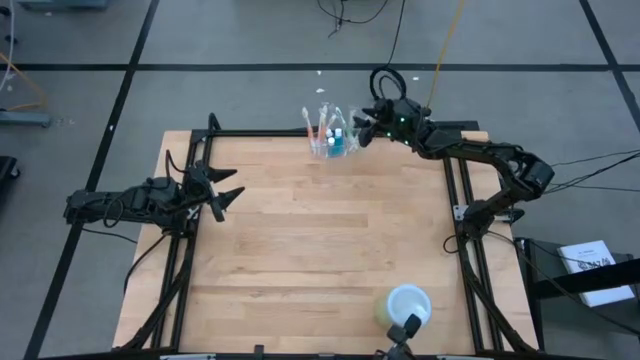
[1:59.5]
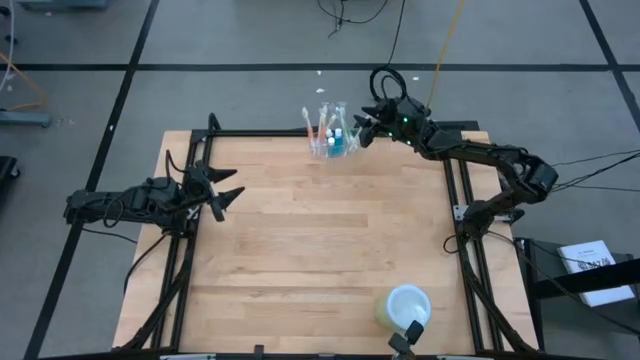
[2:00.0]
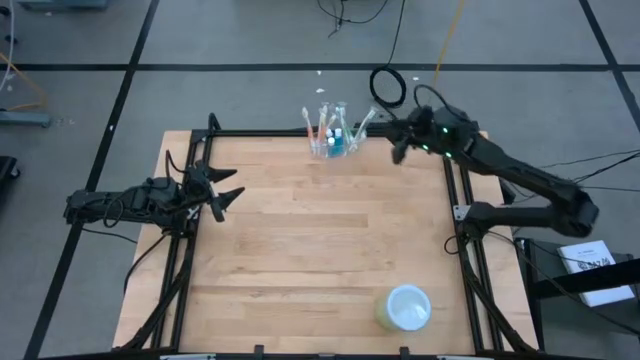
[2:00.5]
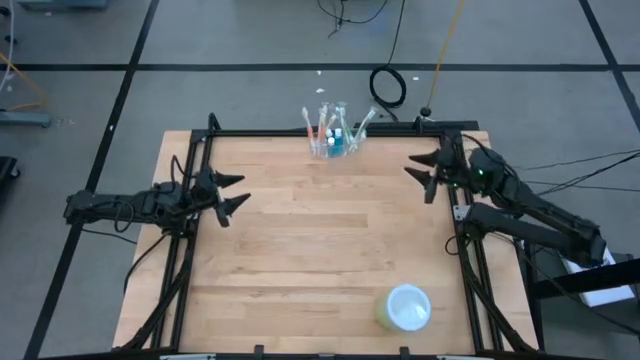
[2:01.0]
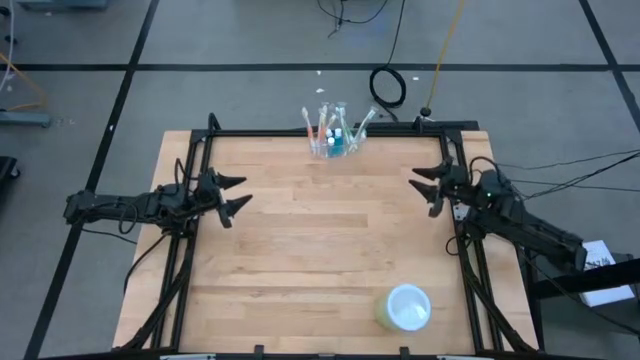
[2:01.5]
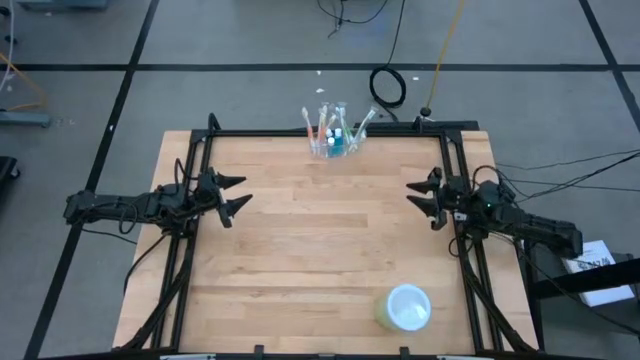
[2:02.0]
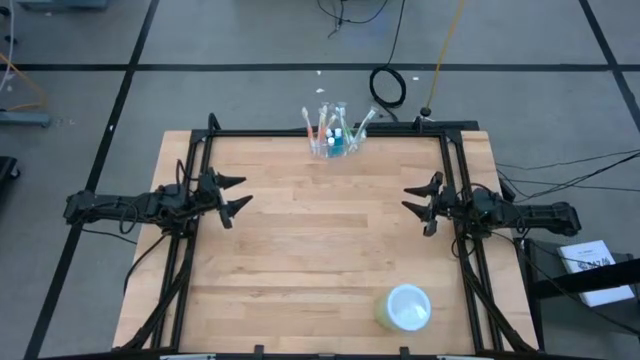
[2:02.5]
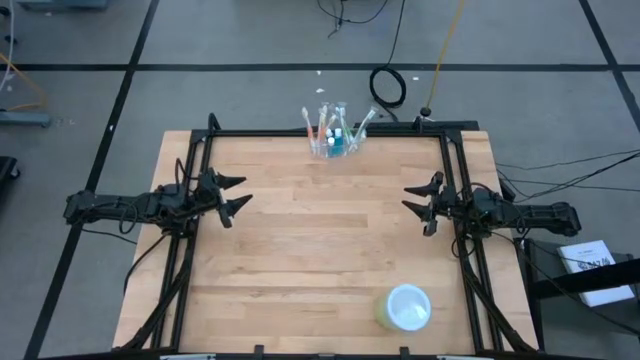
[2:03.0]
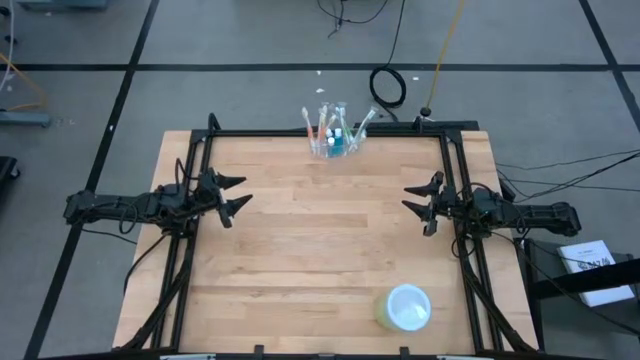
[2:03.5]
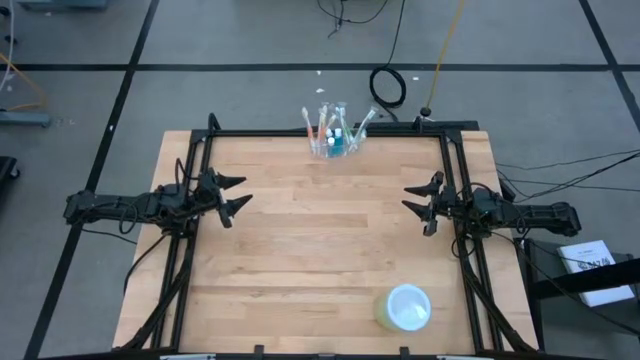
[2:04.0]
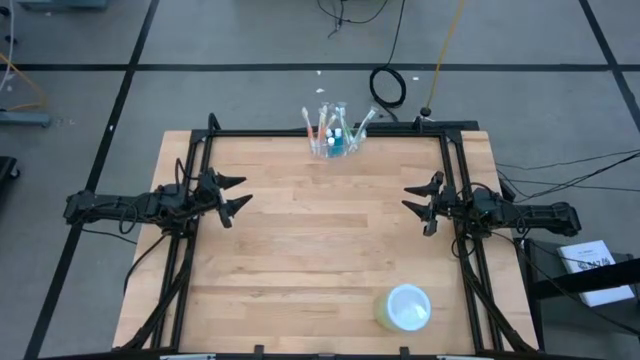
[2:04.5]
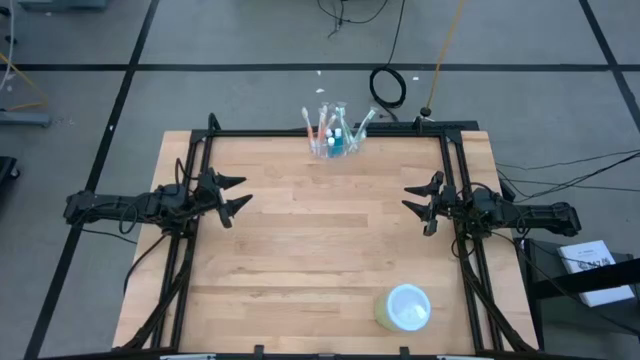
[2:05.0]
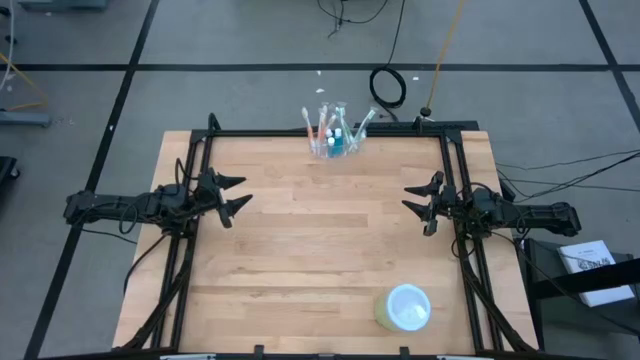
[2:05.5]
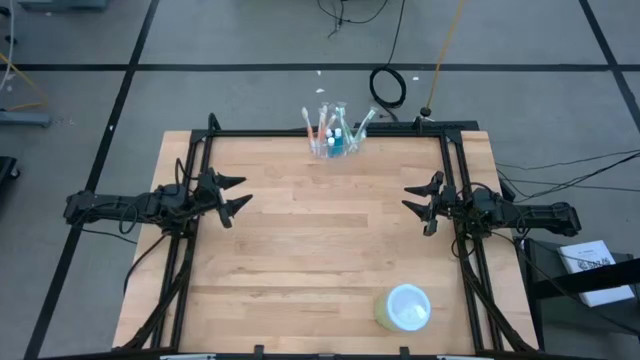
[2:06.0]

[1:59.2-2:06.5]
Task: Pick & Place toothbrushing station
Return to Home Position

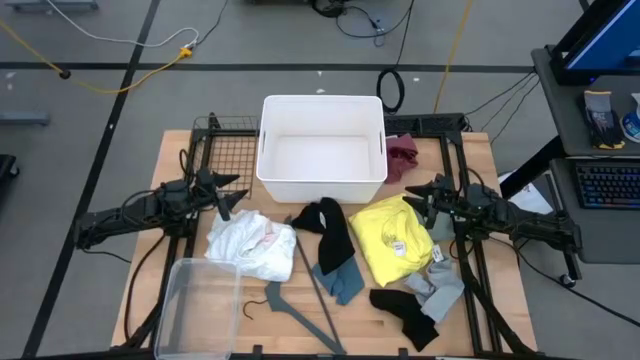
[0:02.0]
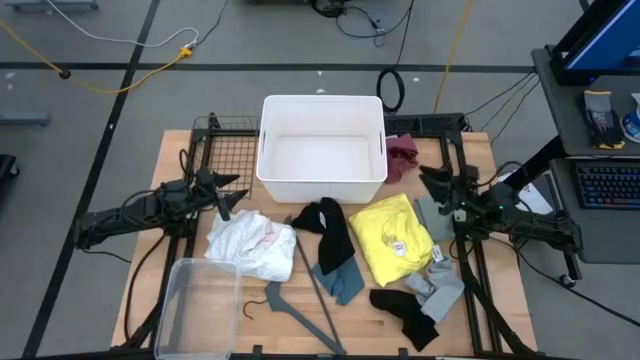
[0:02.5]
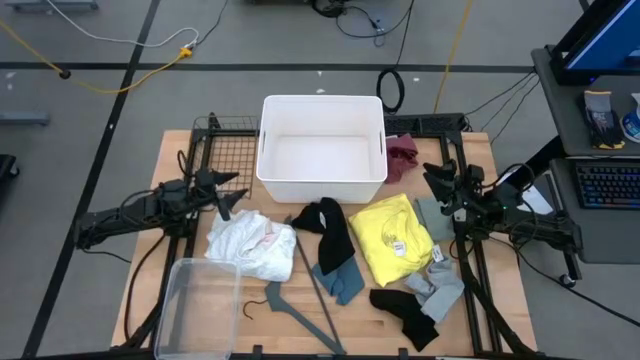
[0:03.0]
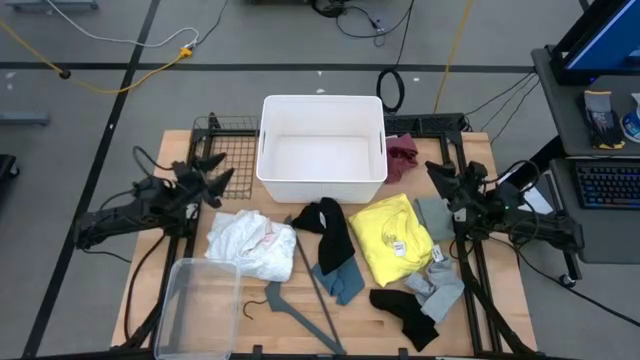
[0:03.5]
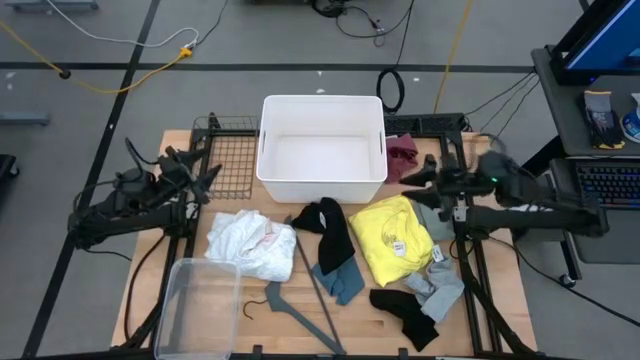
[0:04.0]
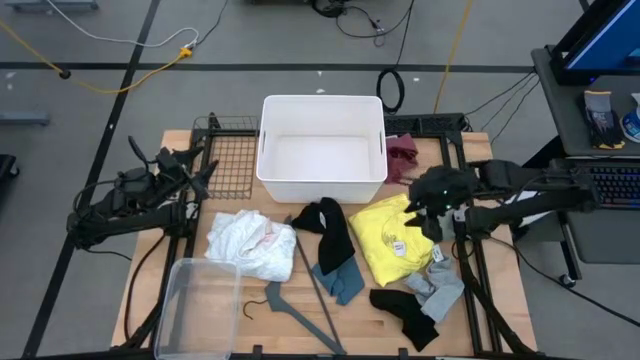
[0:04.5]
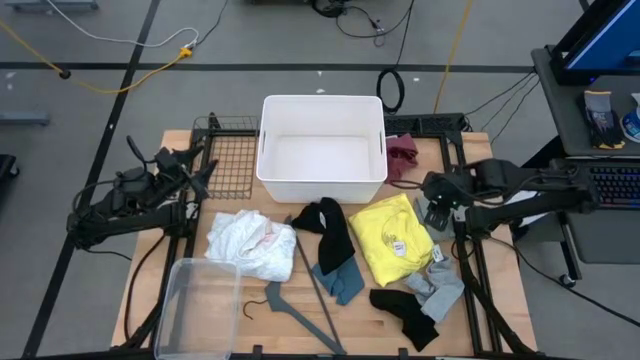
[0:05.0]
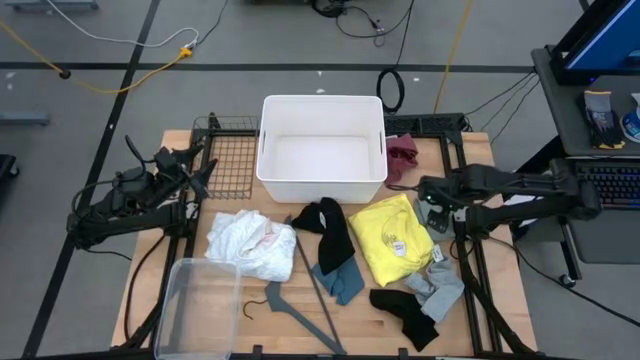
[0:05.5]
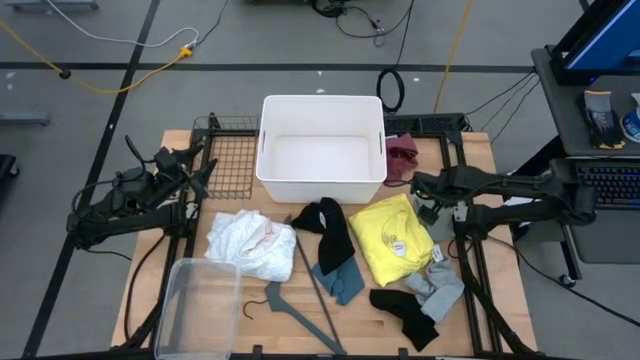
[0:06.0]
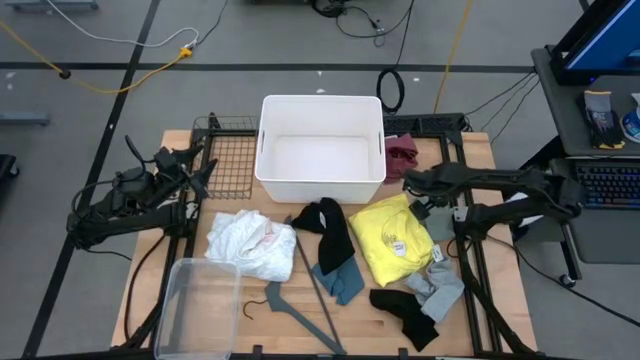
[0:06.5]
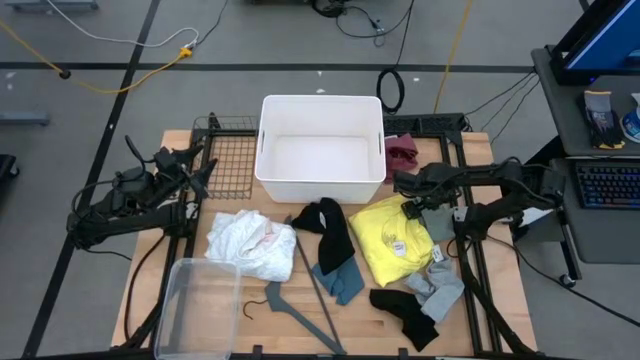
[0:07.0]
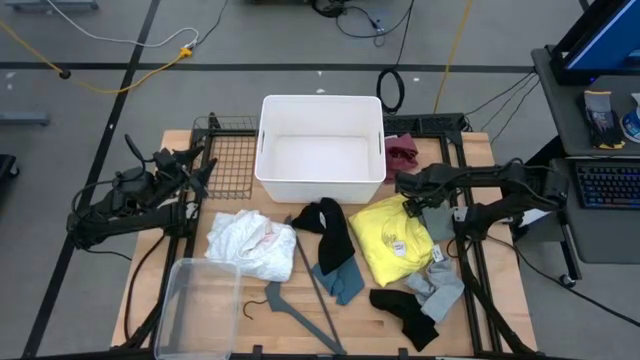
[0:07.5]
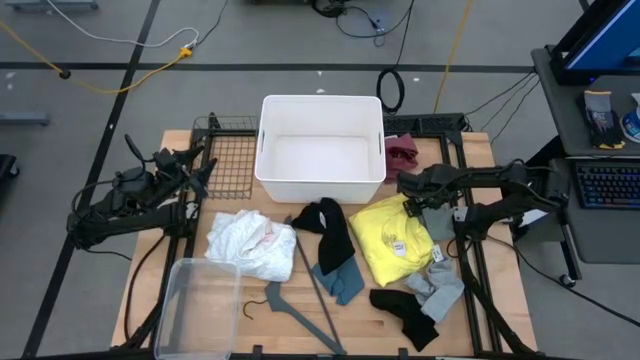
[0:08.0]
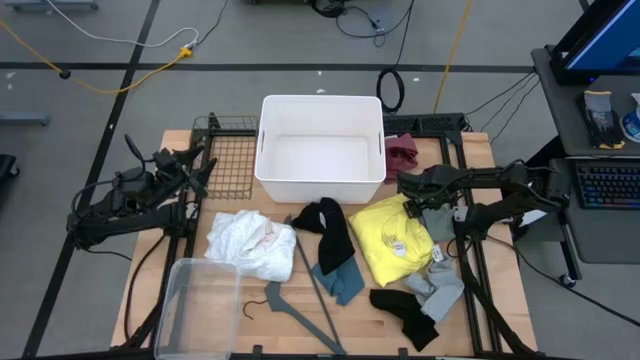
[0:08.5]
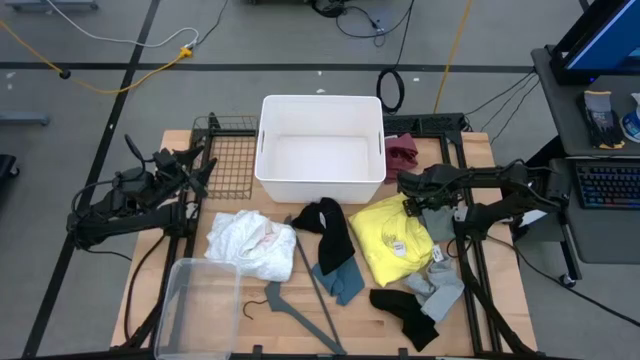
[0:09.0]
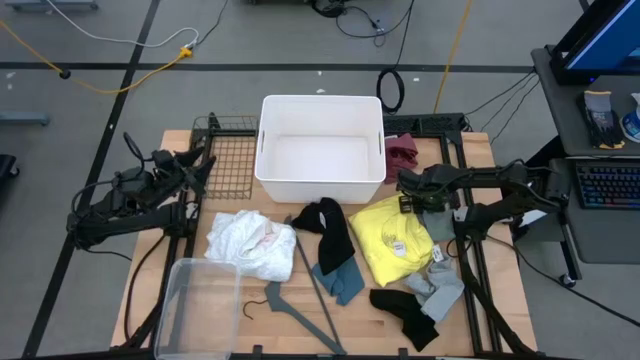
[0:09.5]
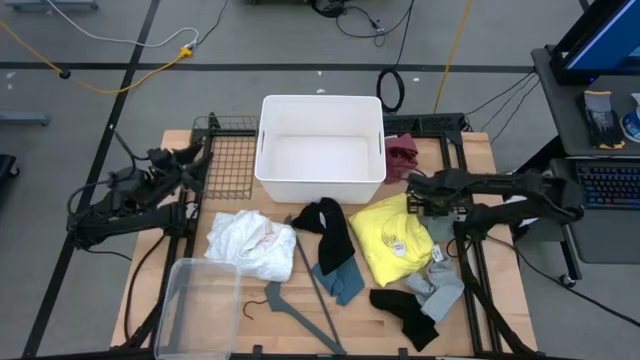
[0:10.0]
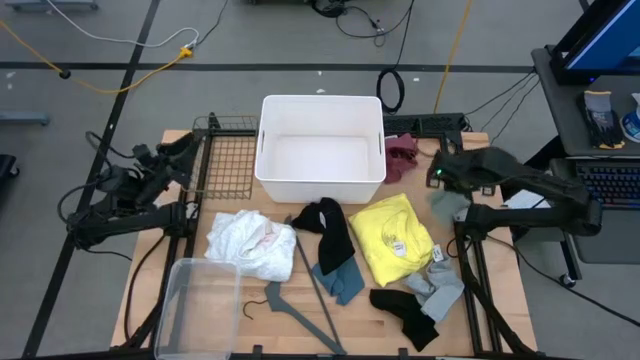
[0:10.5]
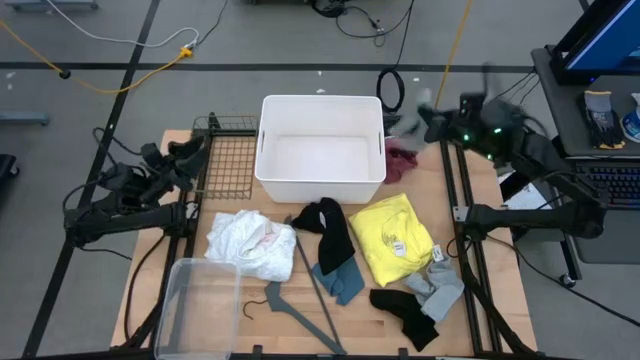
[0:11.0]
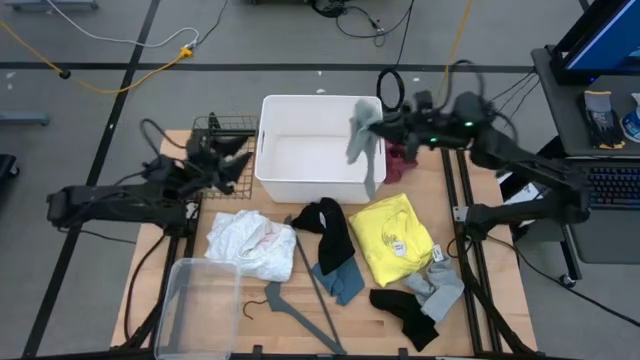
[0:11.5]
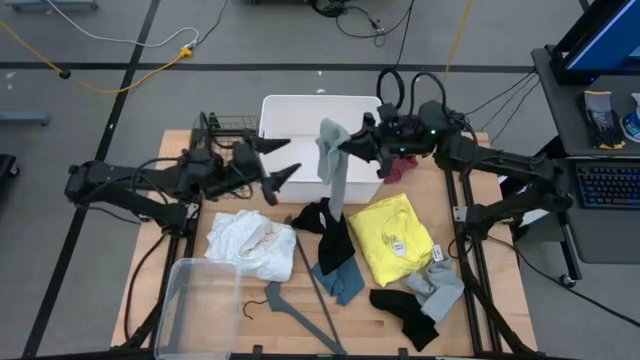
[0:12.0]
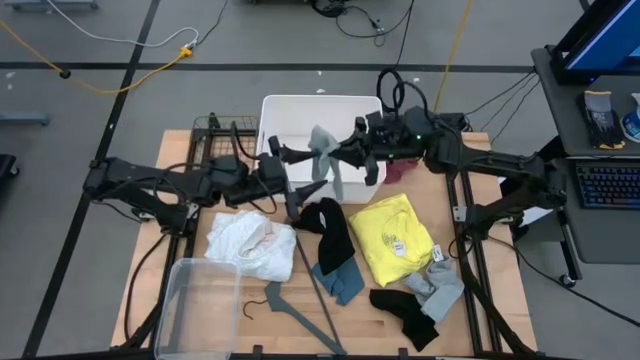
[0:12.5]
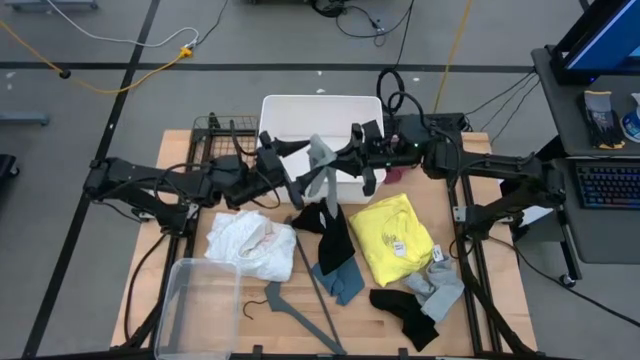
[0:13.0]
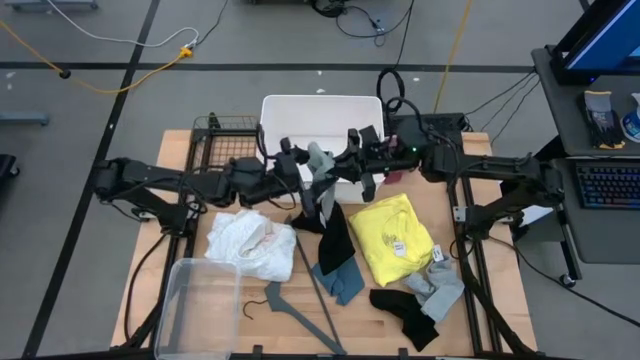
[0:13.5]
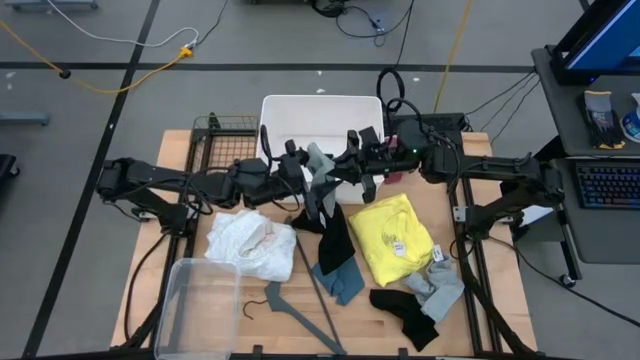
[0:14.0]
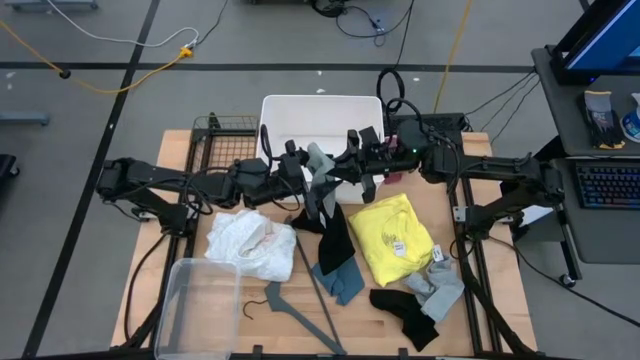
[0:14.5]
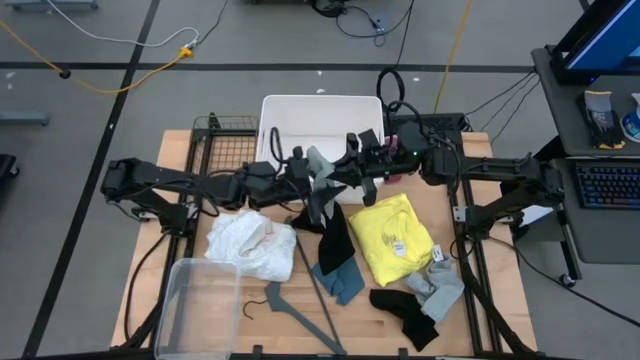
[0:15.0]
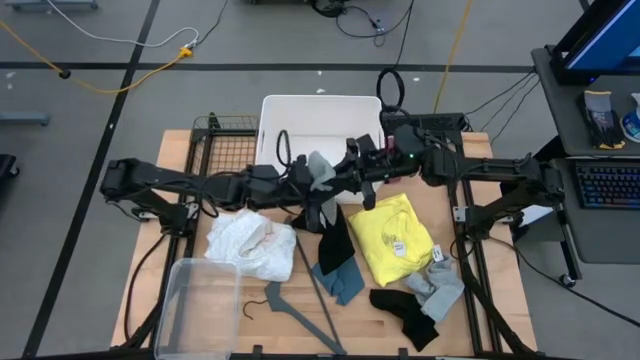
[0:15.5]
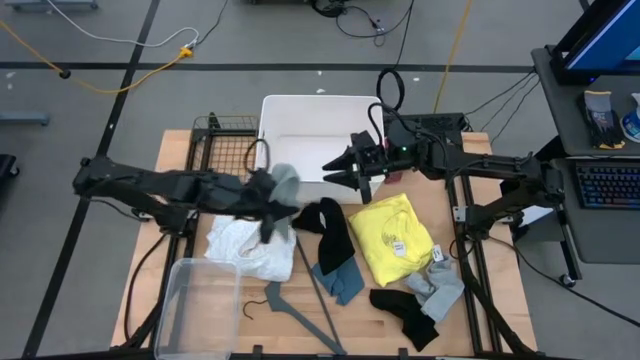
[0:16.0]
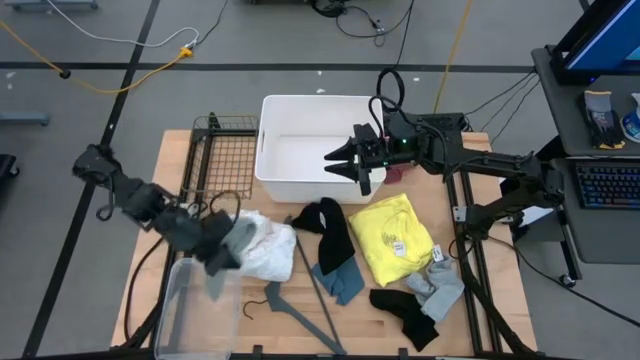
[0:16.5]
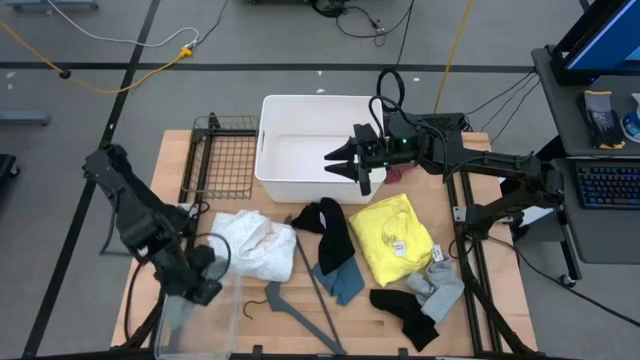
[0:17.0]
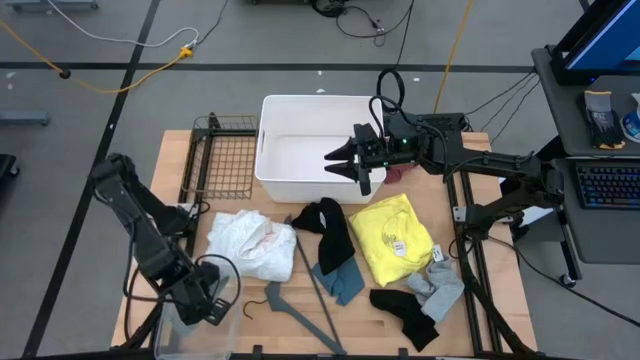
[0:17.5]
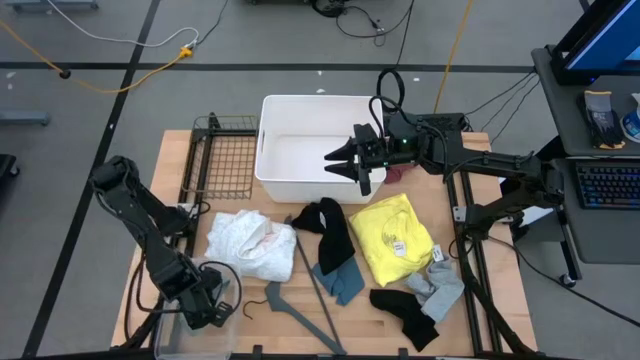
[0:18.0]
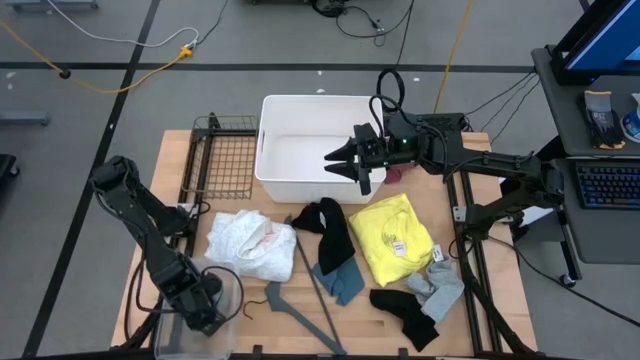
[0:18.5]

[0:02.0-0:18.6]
Task: Pick & Place Cloths
Put the gray sock into the transparent bin
